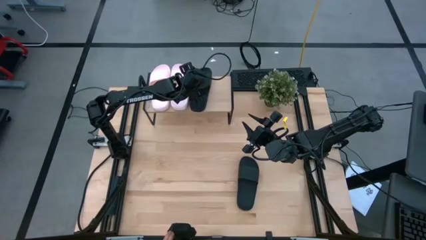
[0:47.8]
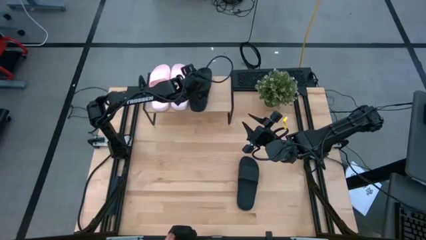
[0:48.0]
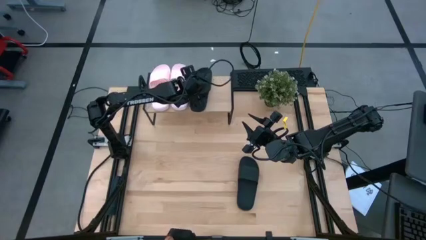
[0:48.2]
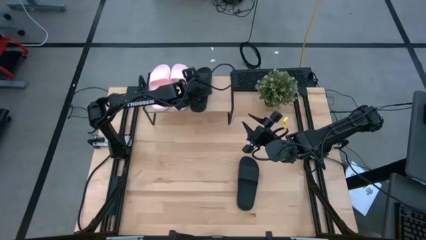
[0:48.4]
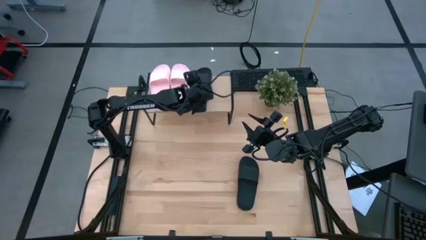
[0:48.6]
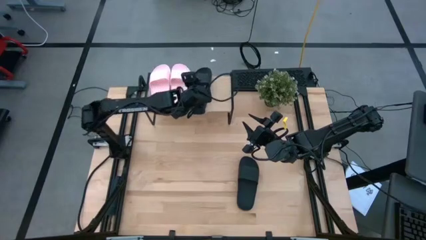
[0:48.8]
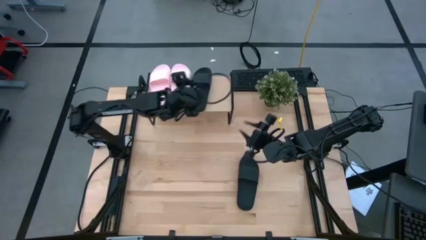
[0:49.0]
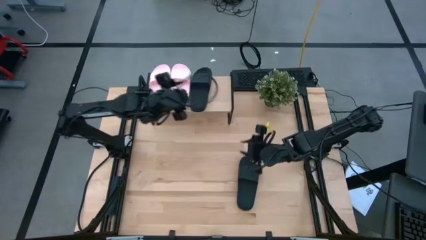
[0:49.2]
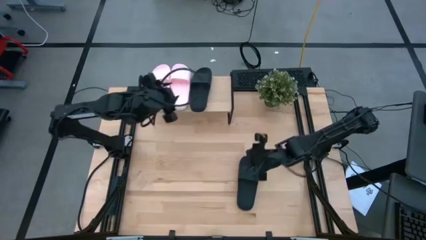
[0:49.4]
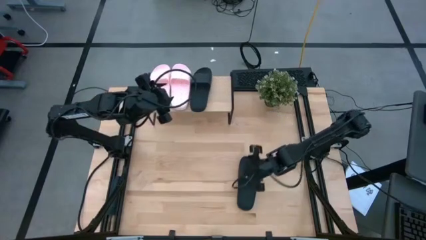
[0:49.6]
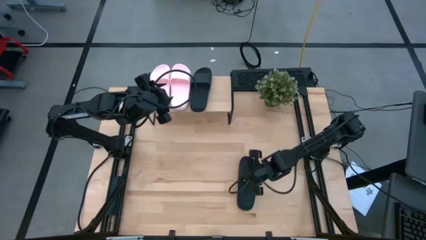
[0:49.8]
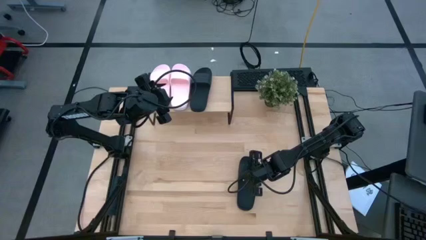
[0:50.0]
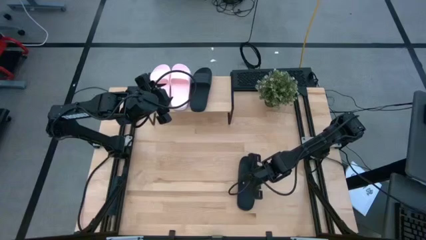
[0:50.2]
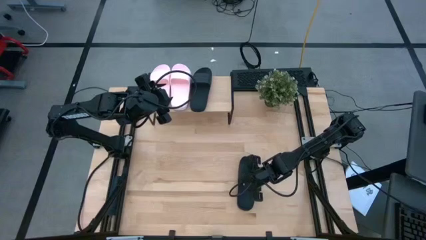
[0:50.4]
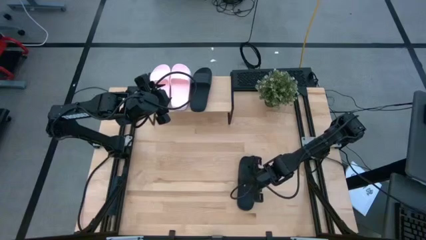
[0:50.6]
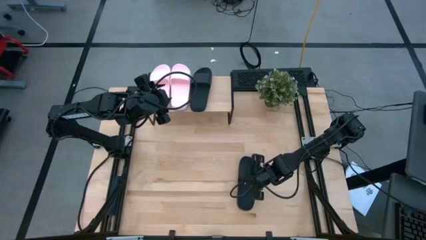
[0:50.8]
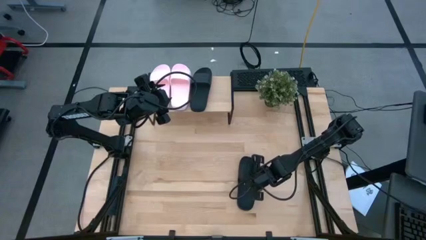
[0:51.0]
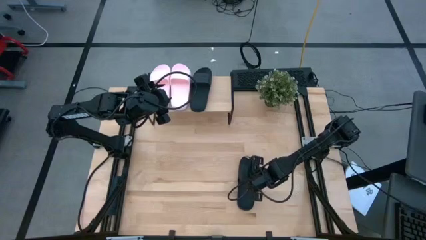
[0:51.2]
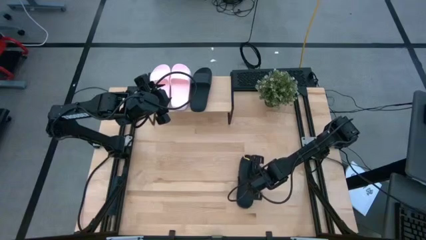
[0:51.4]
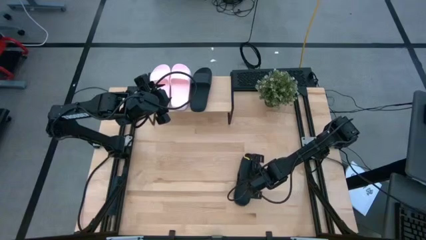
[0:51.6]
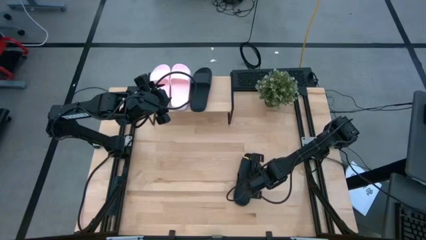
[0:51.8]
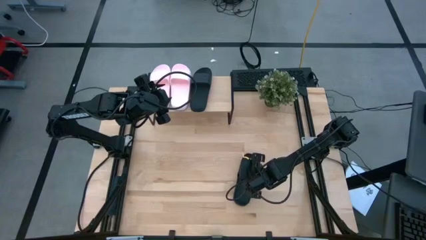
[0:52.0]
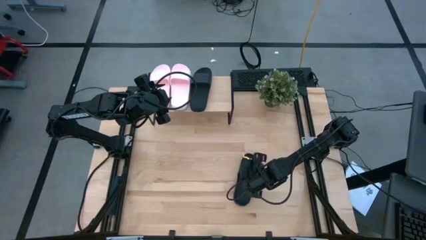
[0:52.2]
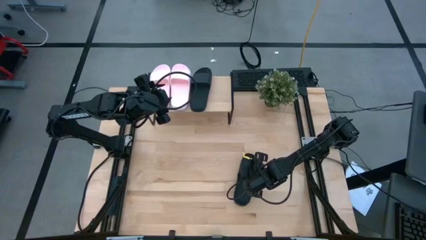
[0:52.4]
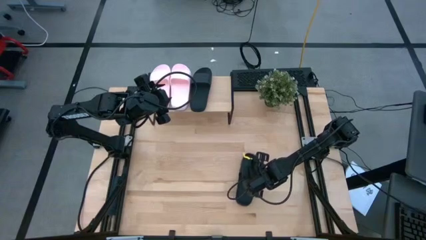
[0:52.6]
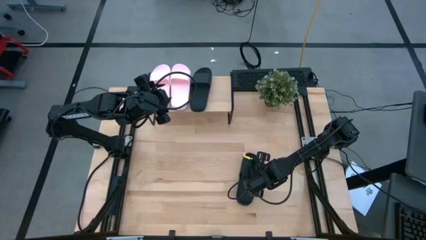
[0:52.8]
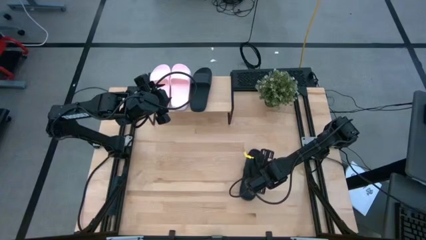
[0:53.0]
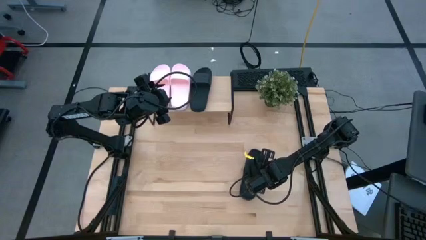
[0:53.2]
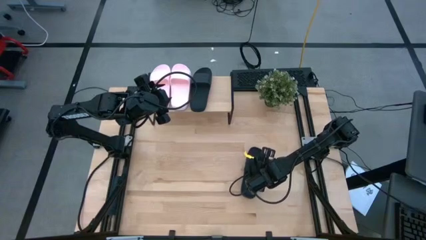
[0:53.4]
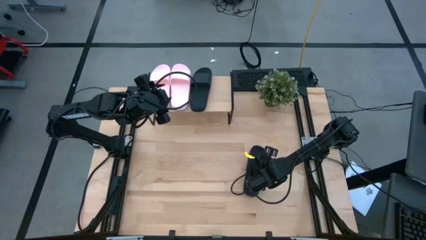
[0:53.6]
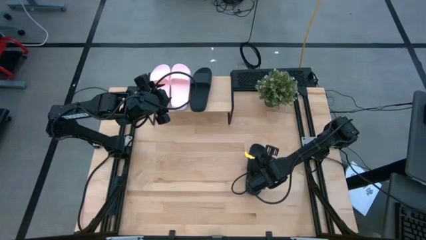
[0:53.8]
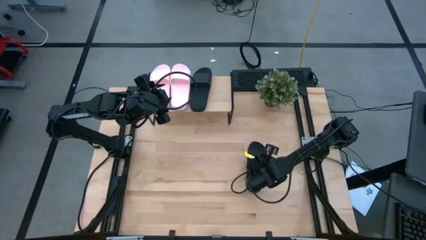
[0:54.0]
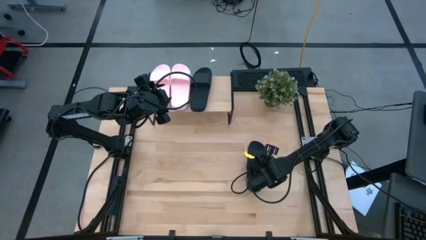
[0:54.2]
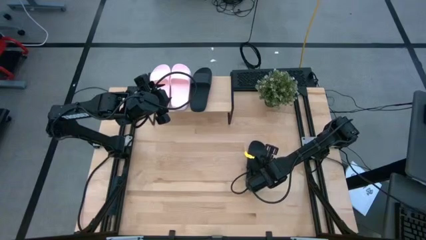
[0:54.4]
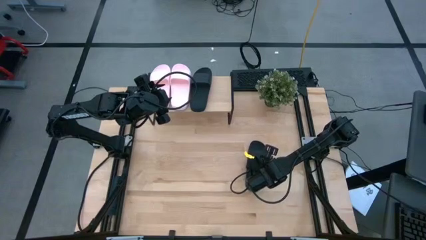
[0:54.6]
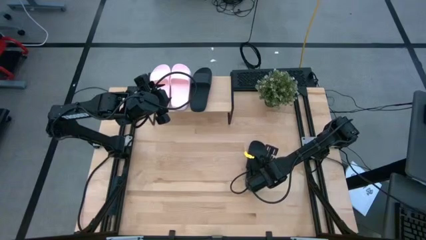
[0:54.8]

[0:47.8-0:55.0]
Task: Pick and place slides into the shelf
Put the black slide on the shelf

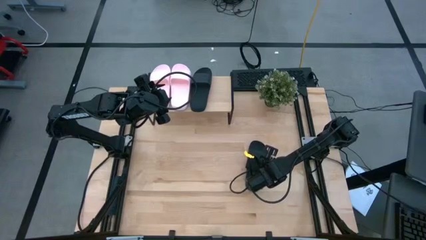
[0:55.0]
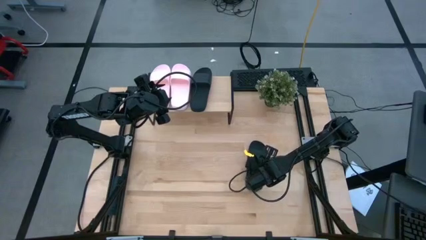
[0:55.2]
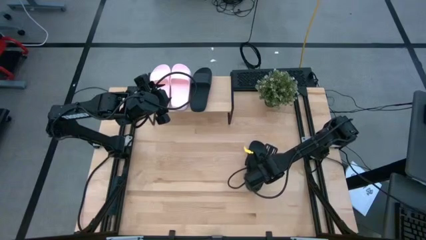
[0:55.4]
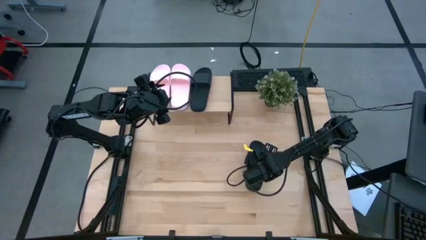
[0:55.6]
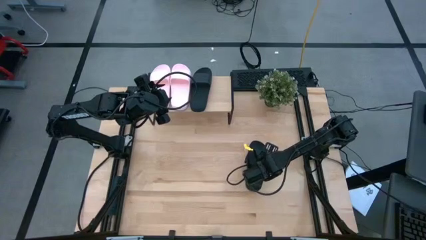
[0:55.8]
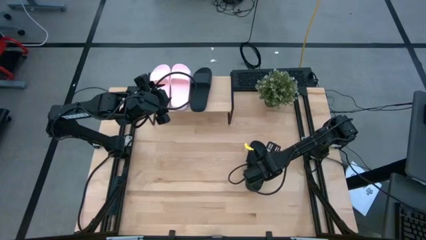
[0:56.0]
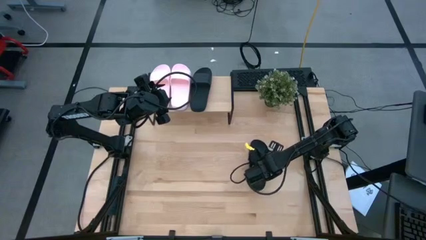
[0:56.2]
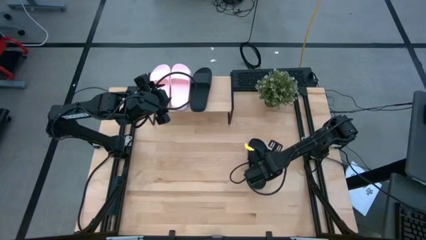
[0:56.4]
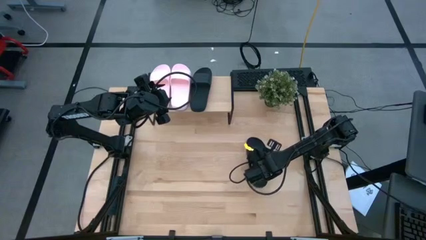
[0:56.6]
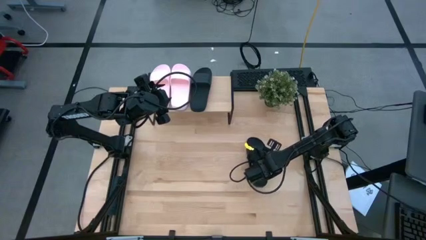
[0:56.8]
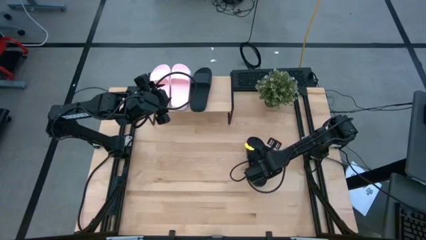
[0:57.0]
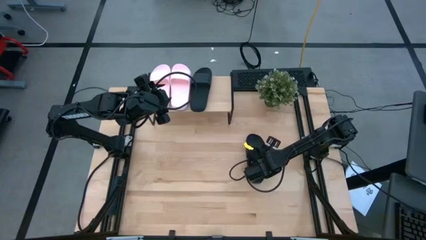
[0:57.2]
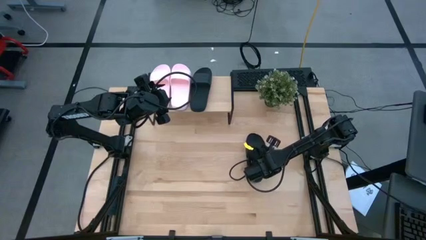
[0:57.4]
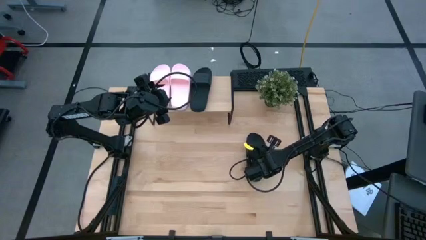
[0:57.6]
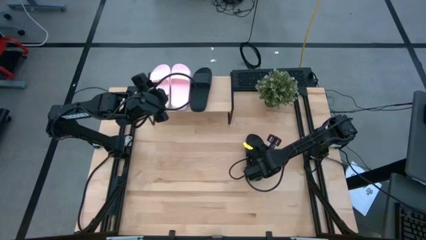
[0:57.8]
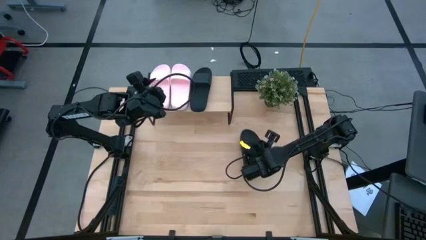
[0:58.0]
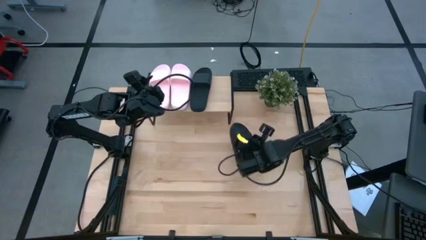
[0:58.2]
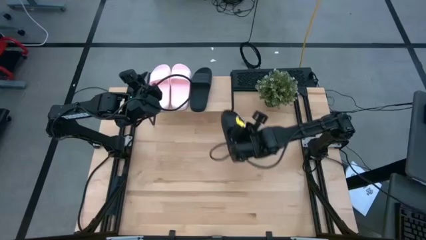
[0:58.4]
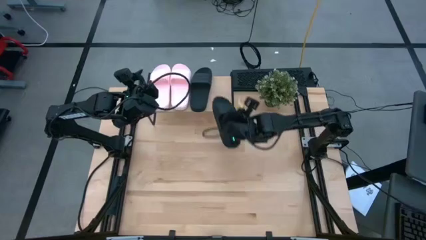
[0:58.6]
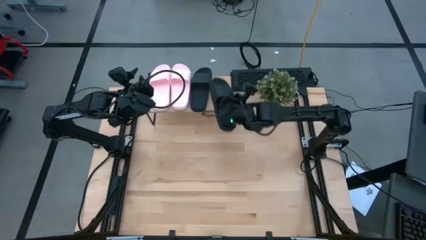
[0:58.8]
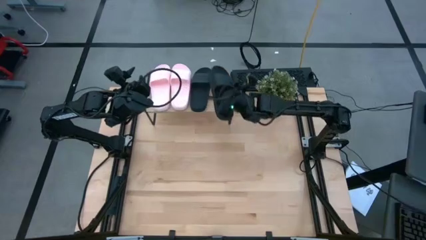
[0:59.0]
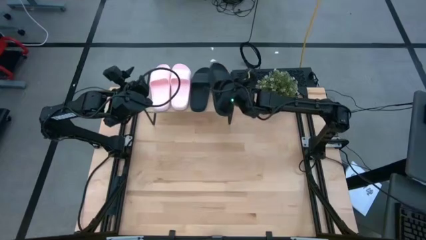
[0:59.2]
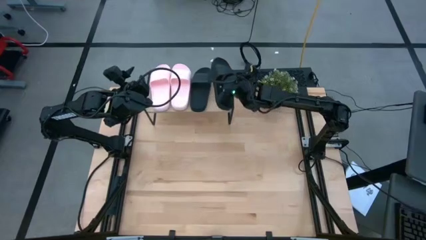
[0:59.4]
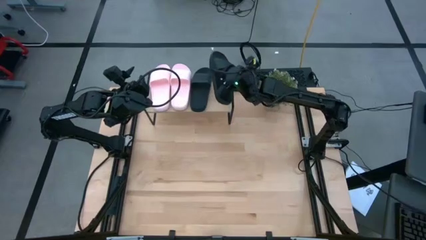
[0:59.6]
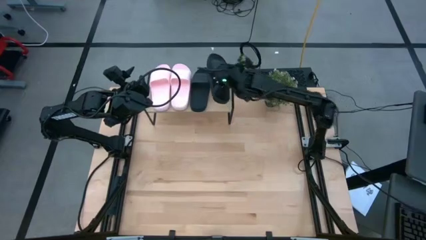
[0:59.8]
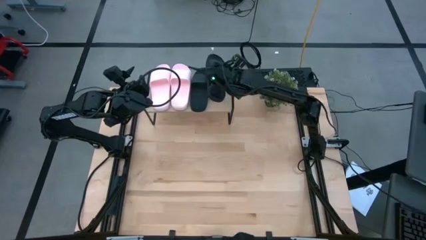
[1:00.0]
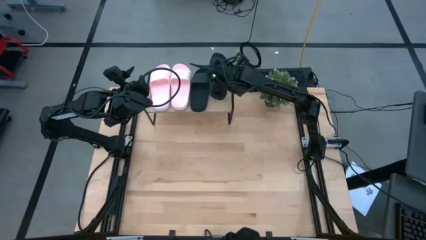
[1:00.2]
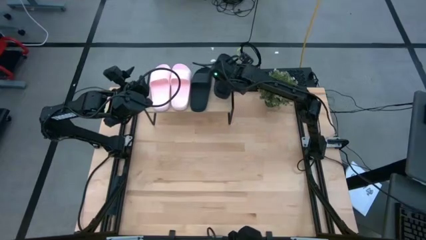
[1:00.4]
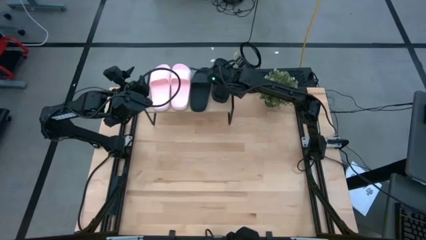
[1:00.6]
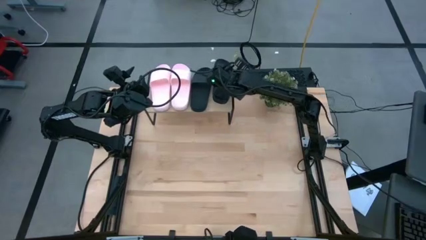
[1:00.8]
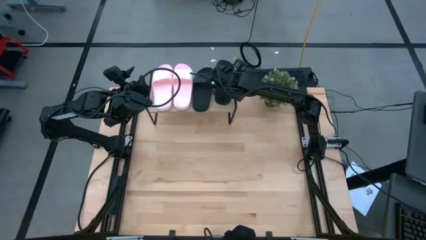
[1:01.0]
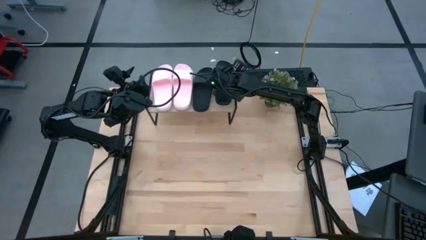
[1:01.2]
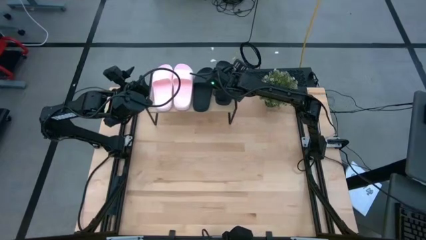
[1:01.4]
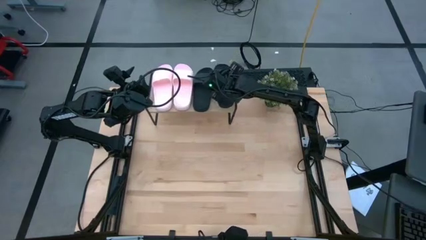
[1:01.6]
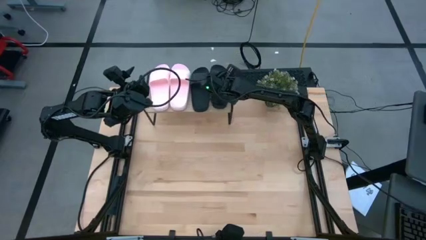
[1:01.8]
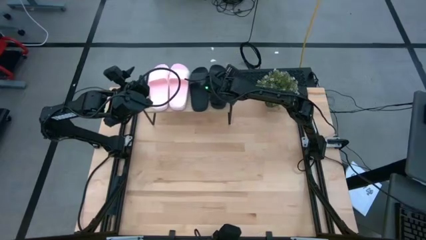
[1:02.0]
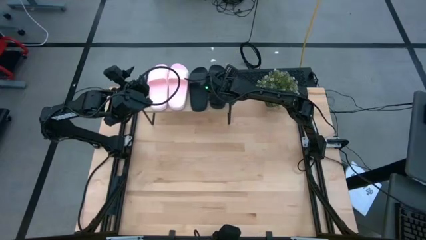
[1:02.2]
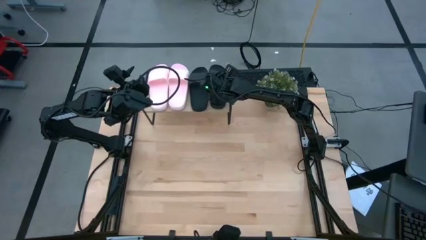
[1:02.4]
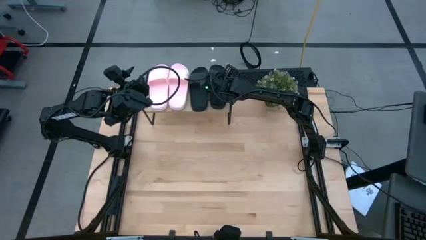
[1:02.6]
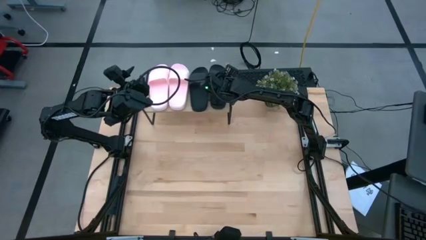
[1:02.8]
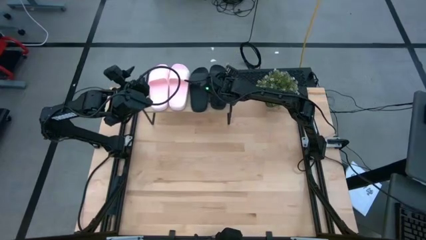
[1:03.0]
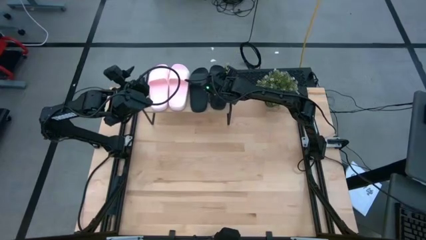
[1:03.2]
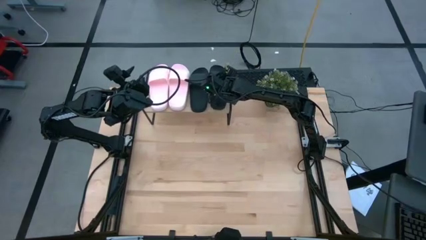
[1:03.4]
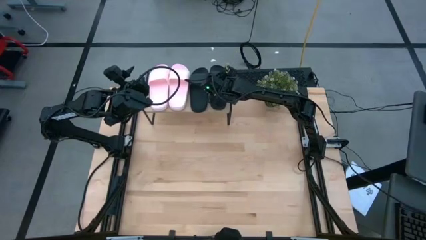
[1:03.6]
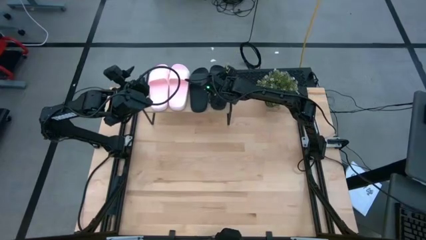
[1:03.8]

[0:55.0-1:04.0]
Put the black slide on the shelf
